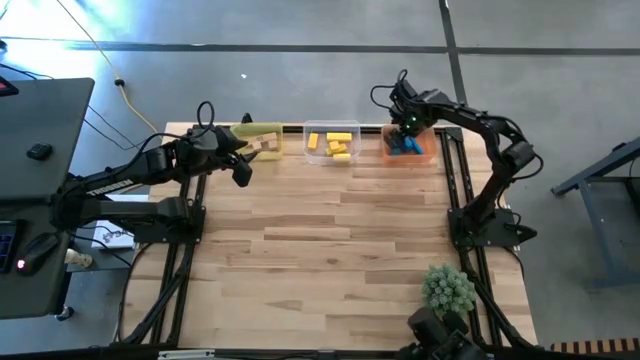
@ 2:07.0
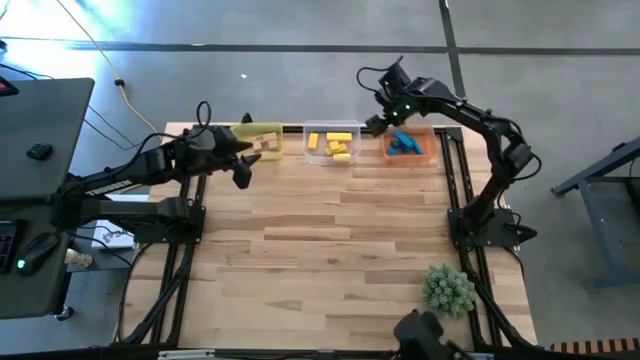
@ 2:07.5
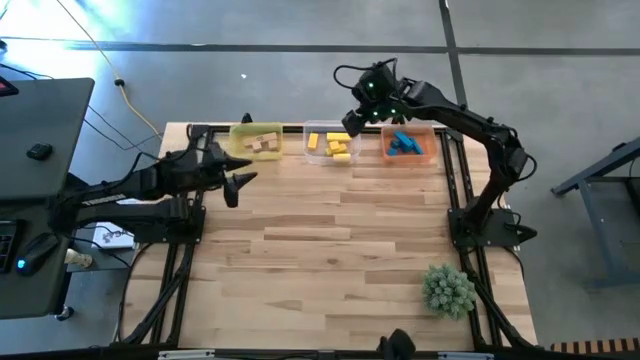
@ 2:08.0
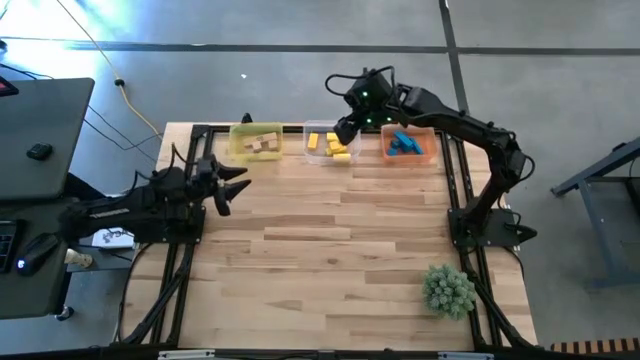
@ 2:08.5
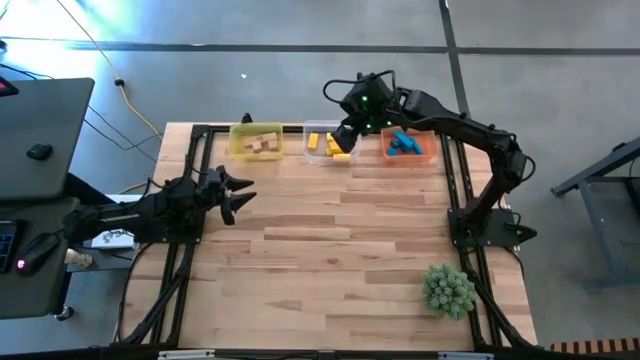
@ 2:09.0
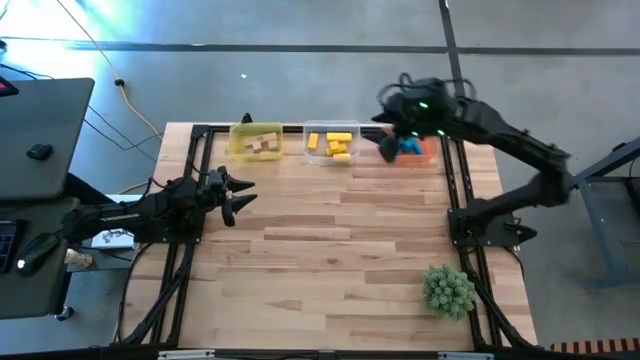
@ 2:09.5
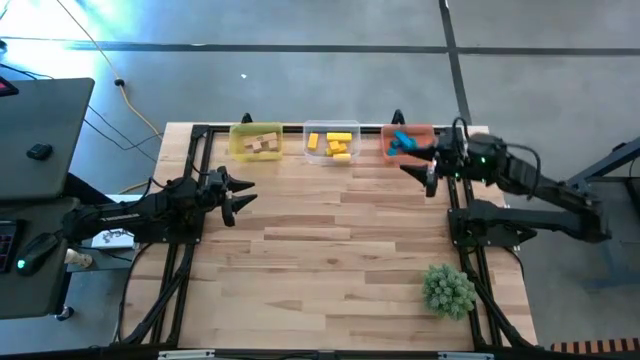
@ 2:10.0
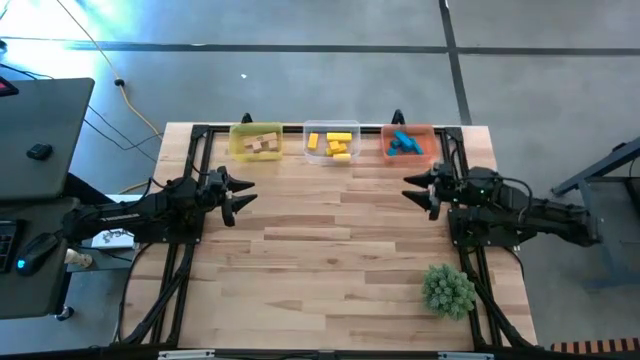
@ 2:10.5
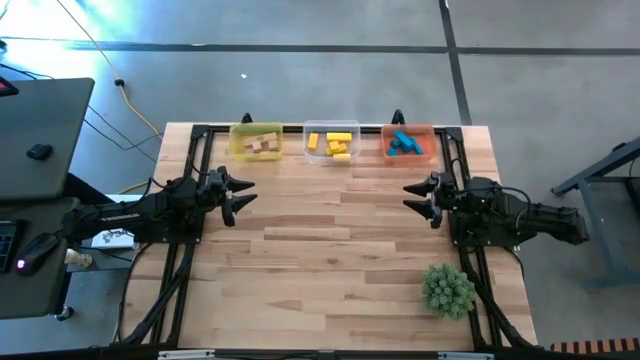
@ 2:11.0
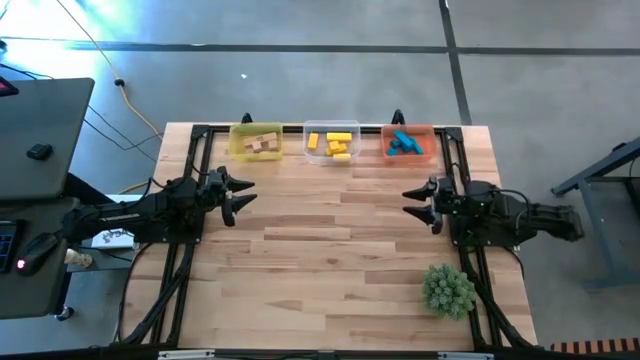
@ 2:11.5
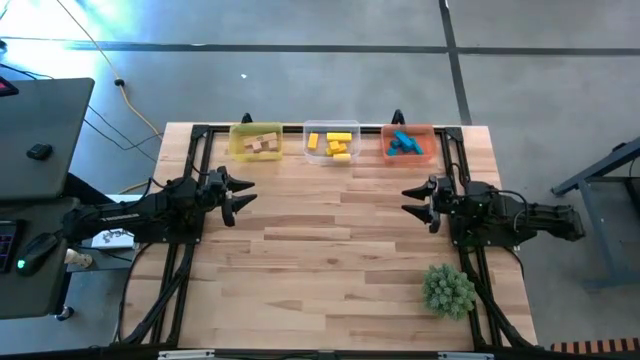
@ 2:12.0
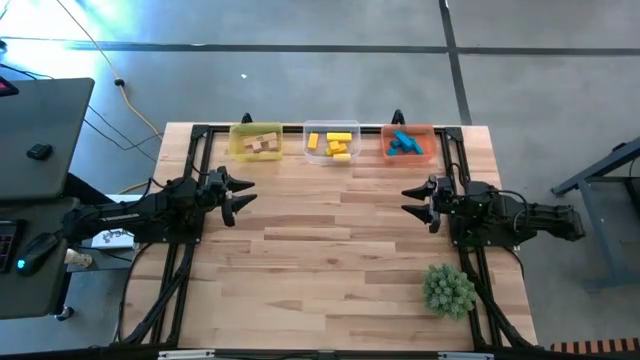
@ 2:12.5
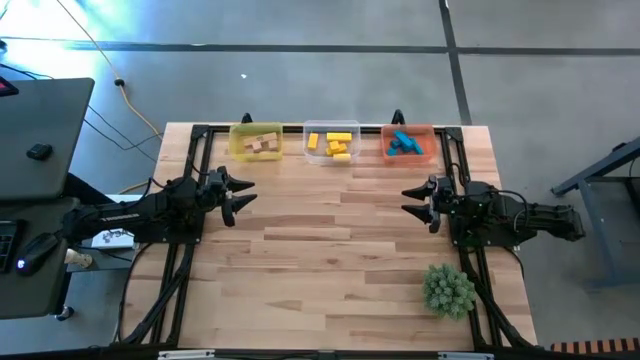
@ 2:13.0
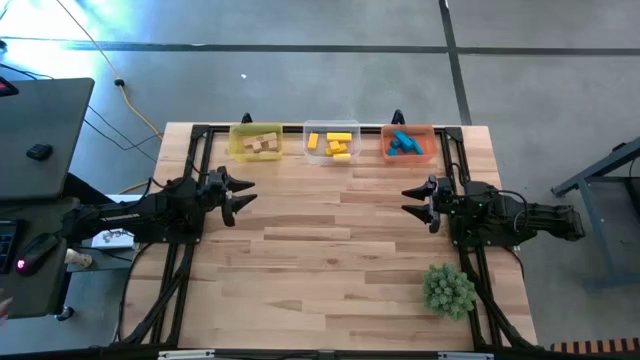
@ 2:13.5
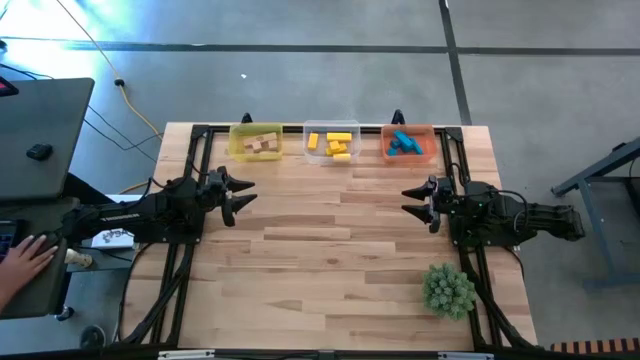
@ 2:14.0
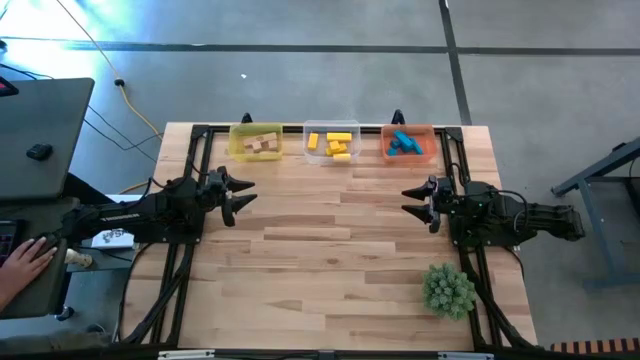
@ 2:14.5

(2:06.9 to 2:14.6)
Task: Sort & place blocks by color
Return to Home Position

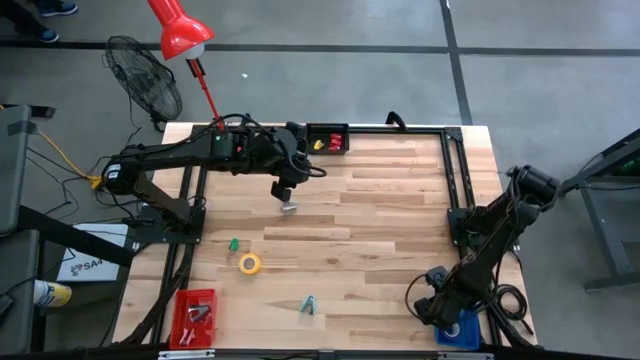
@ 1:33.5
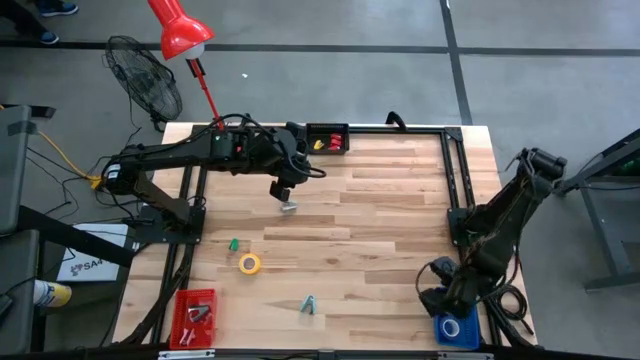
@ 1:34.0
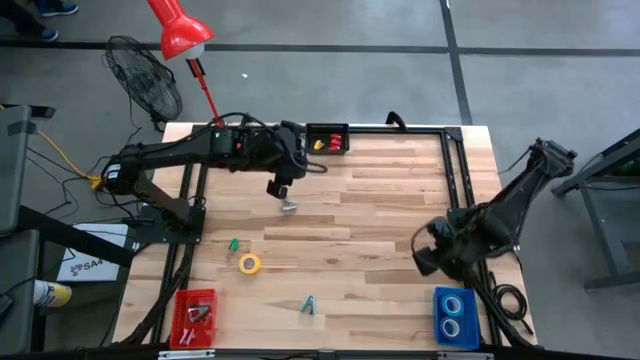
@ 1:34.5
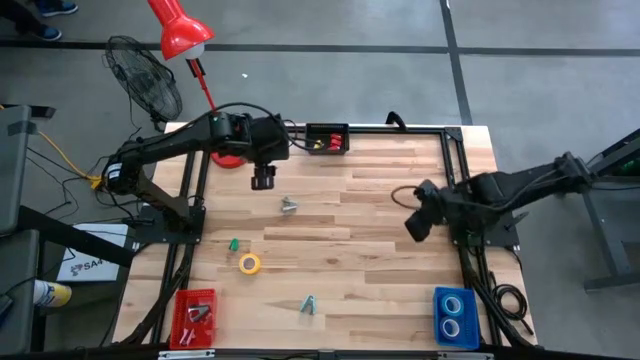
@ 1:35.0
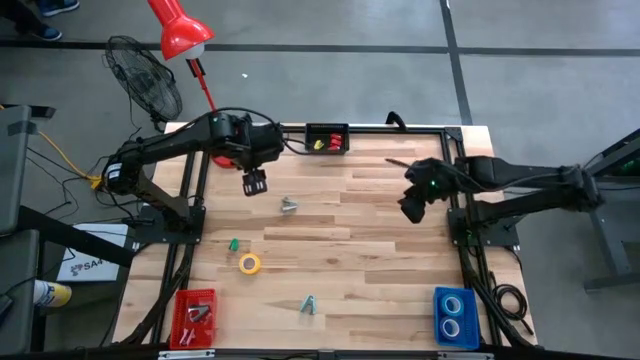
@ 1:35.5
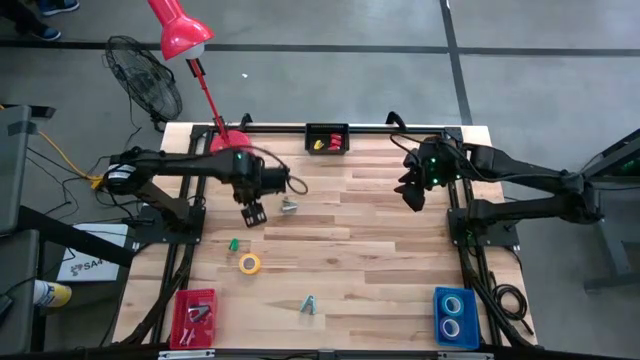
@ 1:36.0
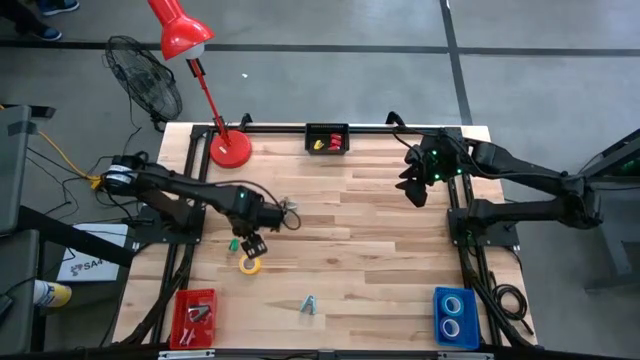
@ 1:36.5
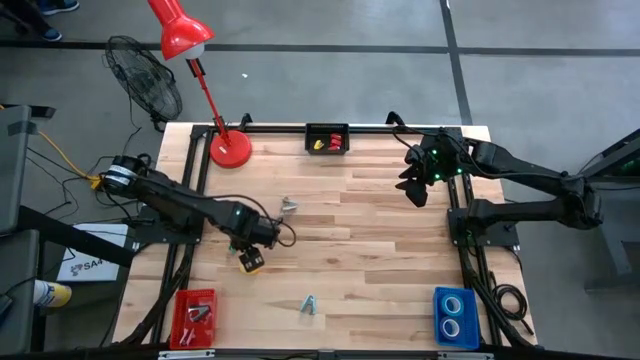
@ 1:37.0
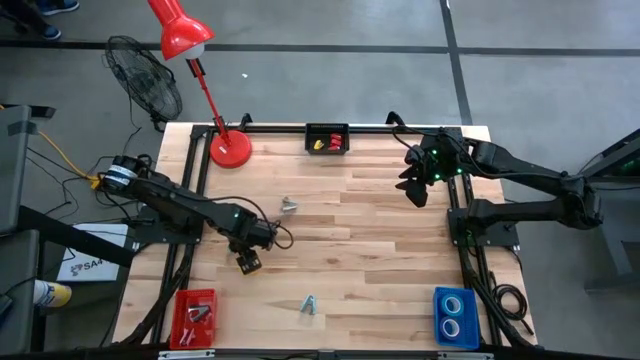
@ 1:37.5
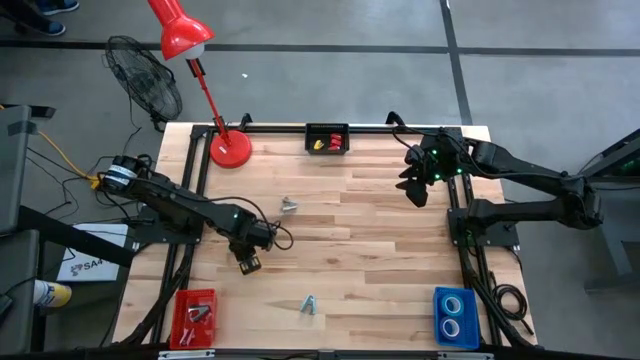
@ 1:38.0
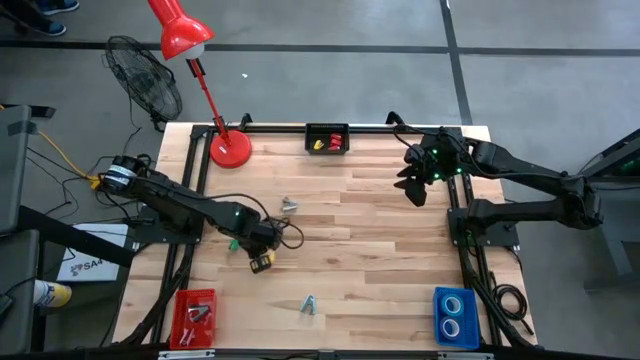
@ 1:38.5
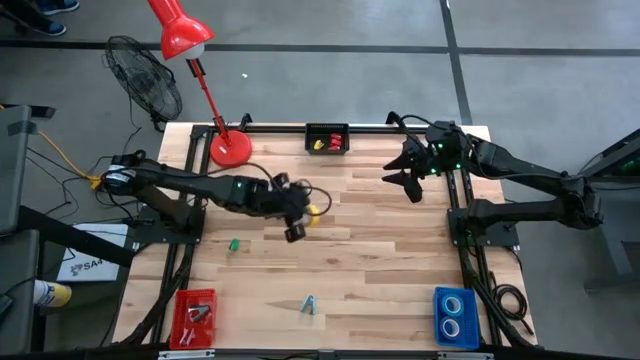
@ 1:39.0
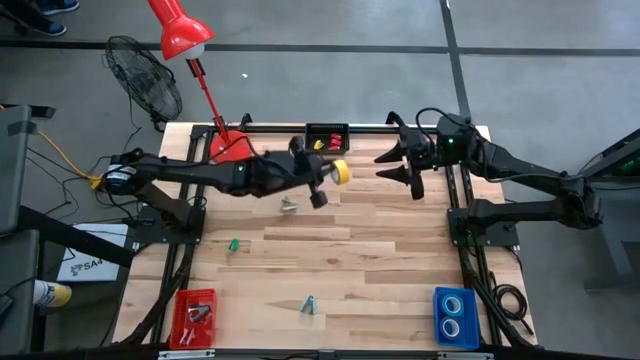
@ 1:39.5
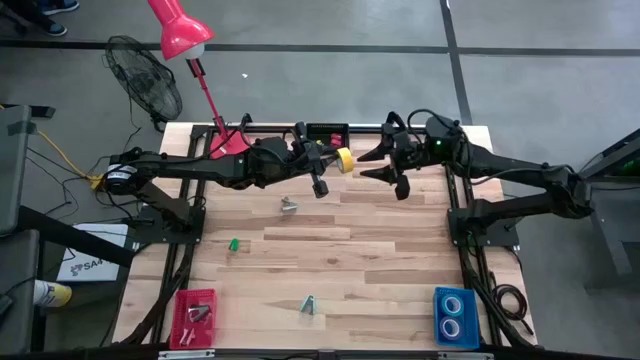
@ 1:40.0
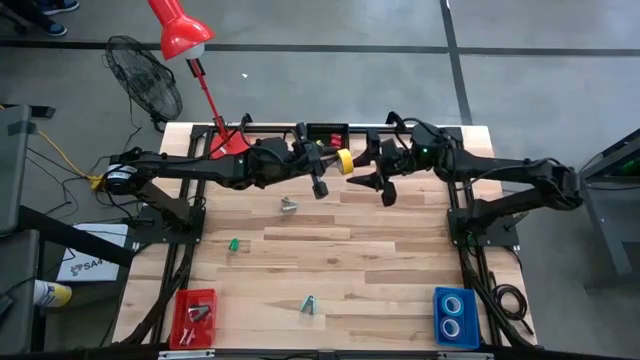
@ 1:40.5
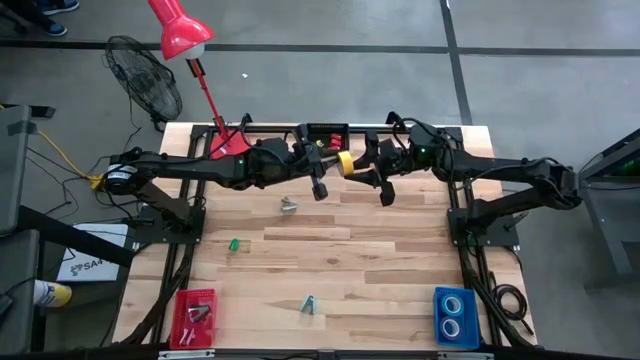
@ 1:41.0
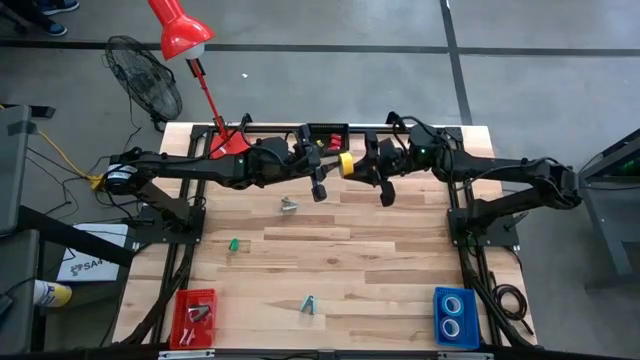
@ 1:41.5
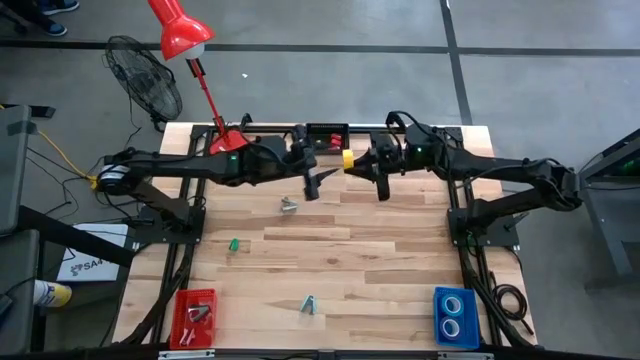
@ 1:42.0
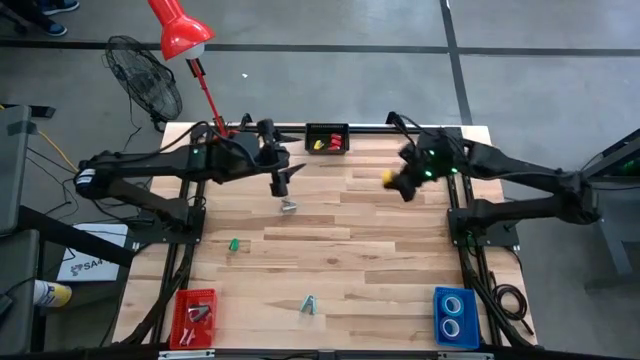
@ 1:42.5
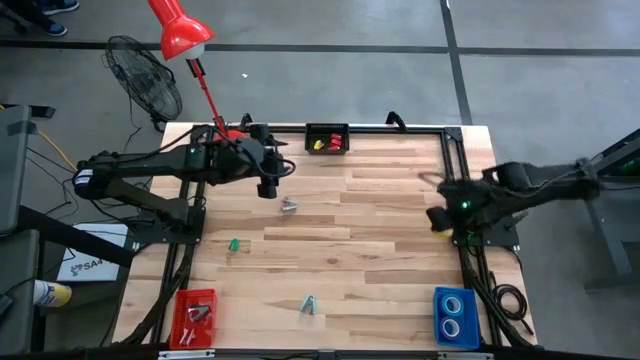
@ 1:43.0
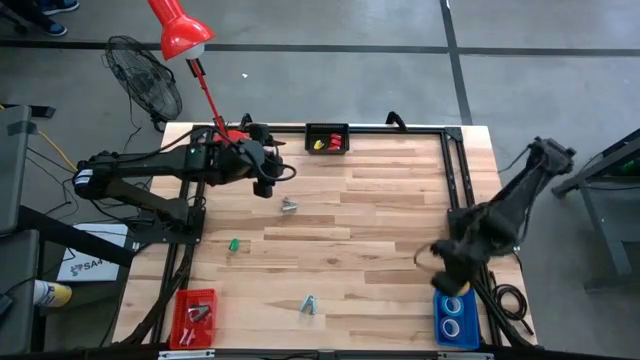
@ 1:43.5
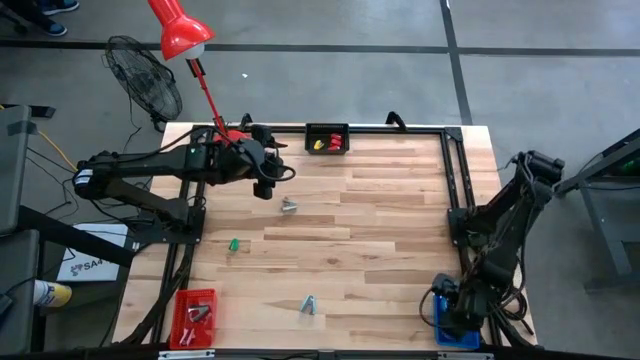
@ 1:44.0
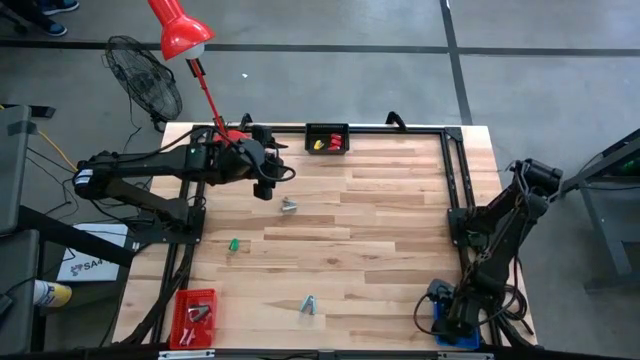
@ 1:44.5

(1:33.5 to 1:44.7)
Task: Pick and place Stapler, Stapler remover, tape
Put the yellow tape into the blue basket
